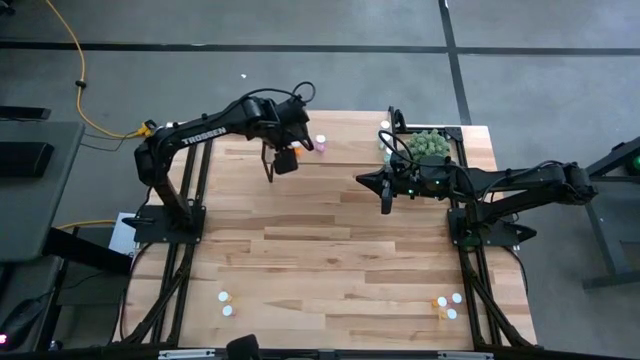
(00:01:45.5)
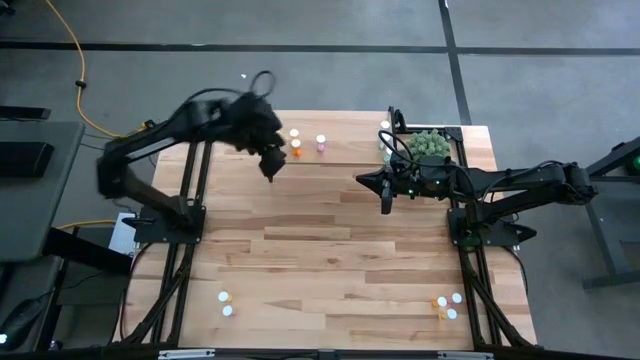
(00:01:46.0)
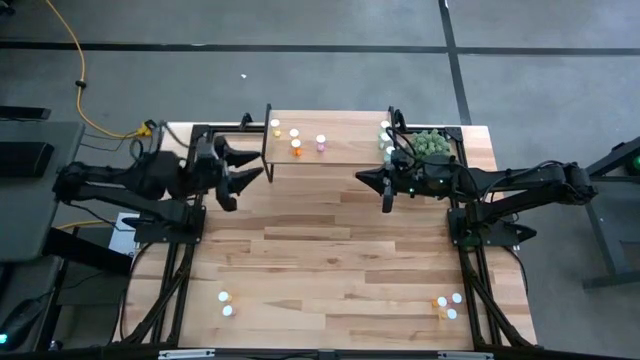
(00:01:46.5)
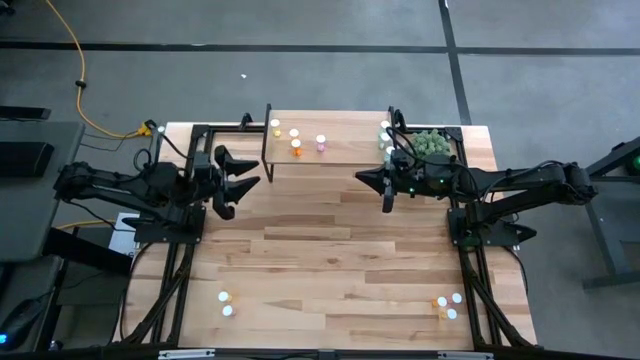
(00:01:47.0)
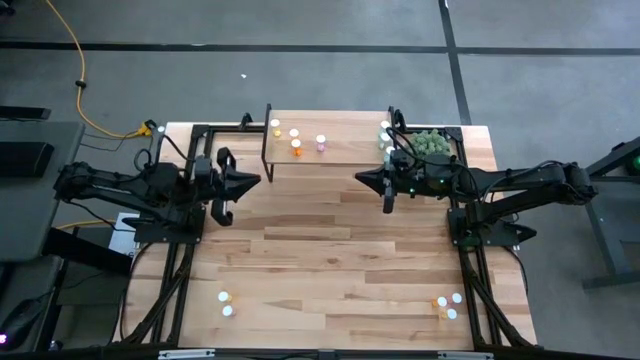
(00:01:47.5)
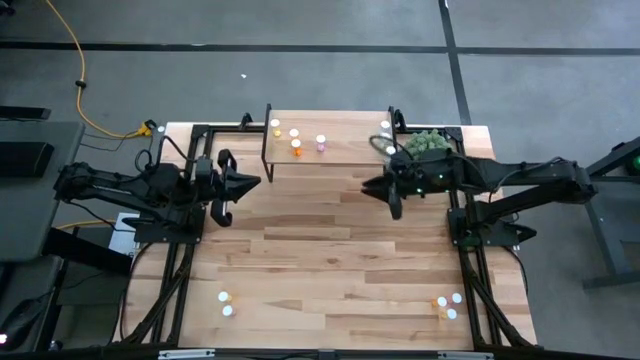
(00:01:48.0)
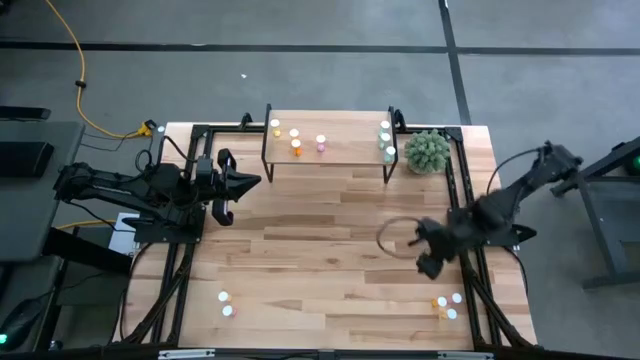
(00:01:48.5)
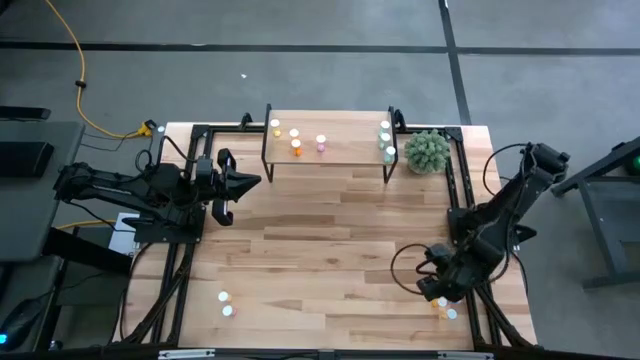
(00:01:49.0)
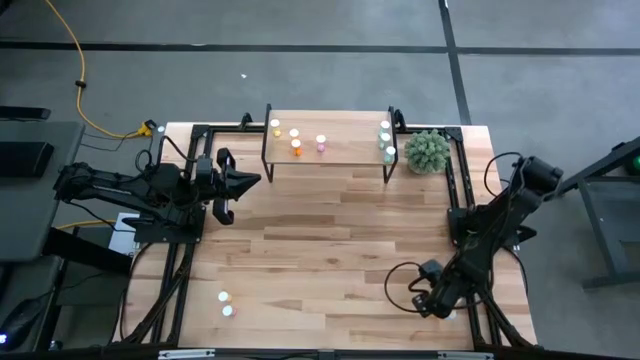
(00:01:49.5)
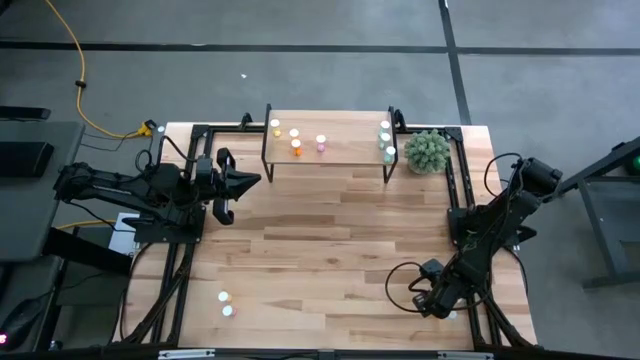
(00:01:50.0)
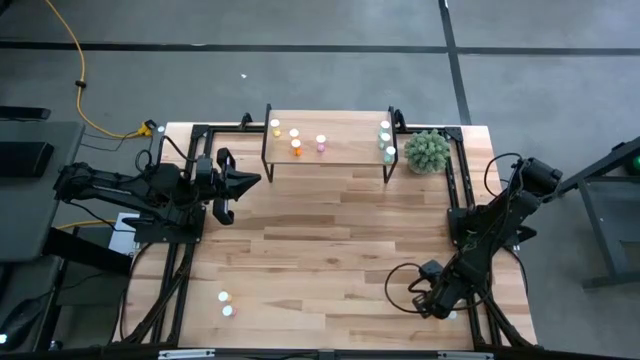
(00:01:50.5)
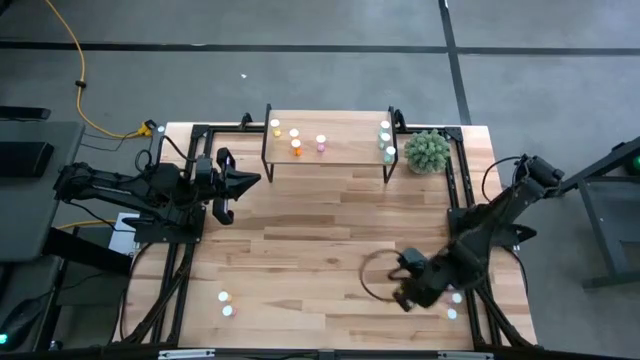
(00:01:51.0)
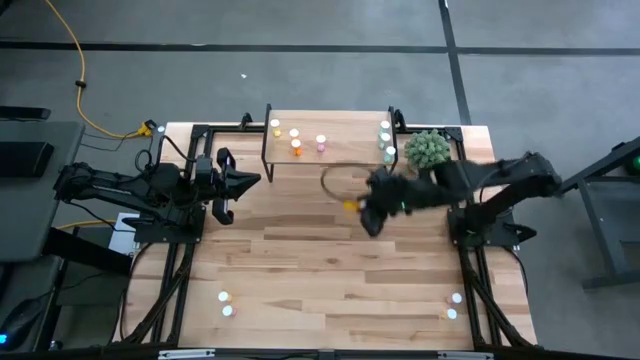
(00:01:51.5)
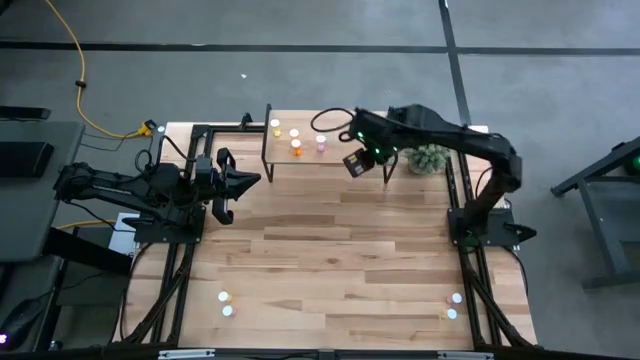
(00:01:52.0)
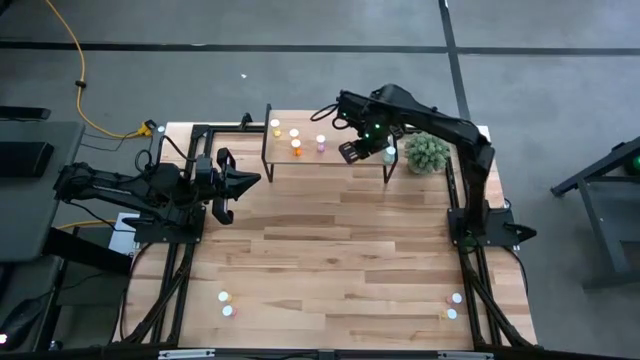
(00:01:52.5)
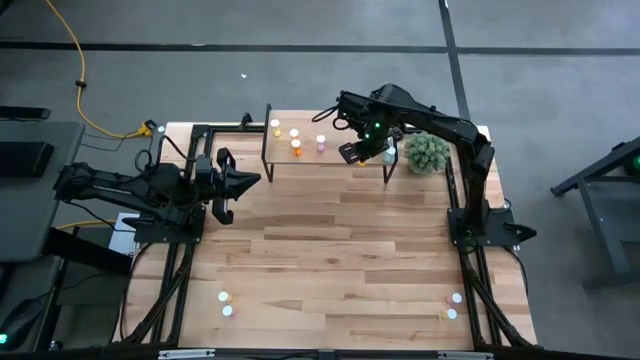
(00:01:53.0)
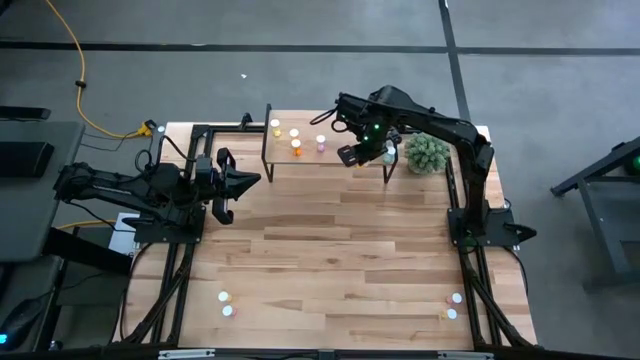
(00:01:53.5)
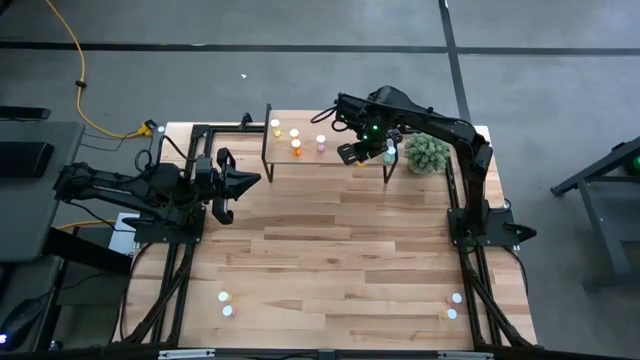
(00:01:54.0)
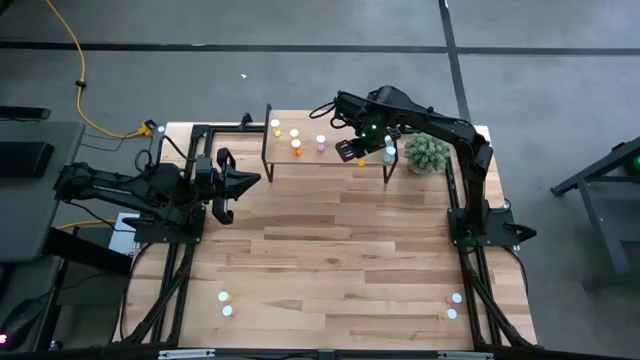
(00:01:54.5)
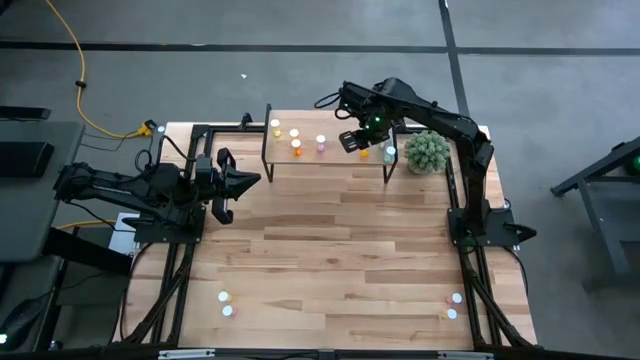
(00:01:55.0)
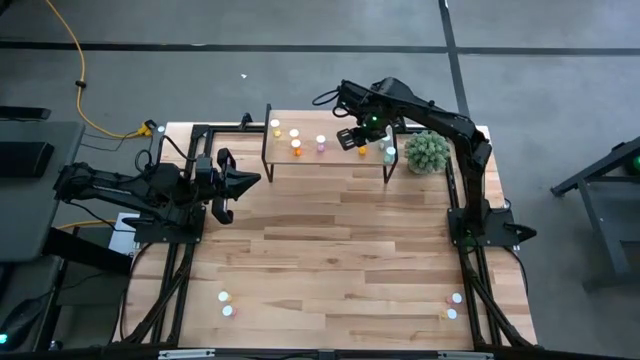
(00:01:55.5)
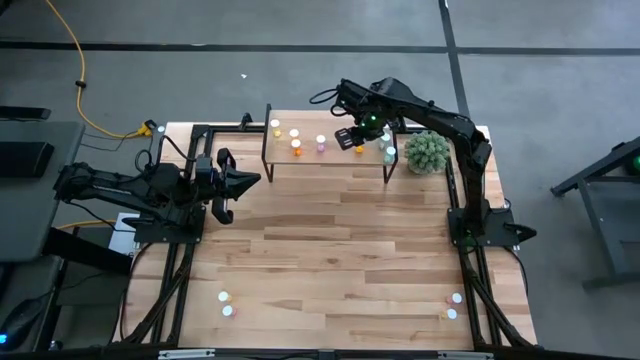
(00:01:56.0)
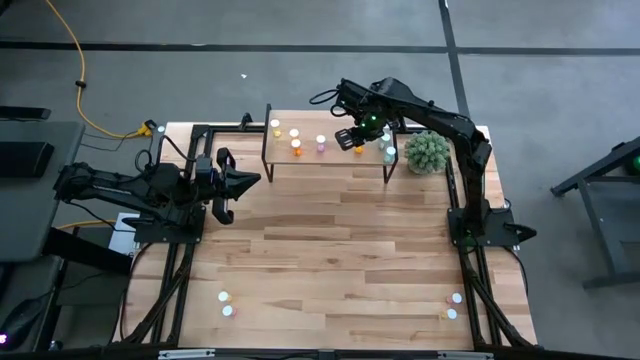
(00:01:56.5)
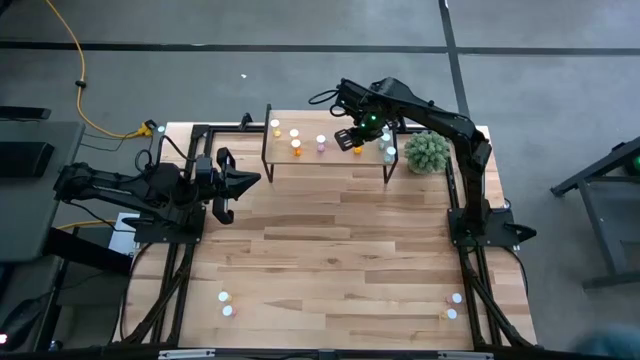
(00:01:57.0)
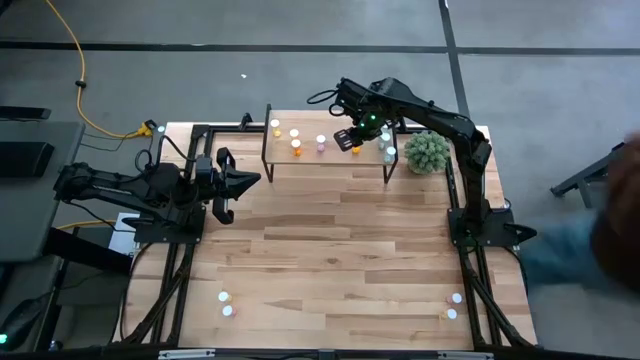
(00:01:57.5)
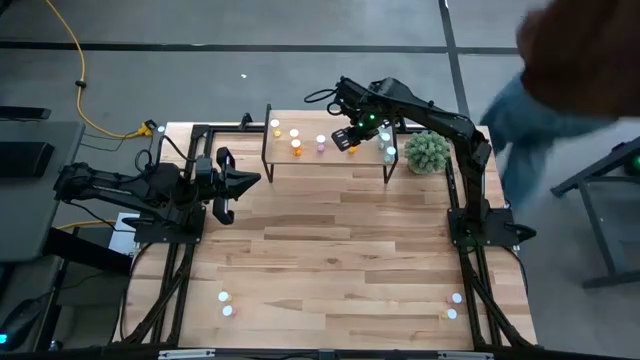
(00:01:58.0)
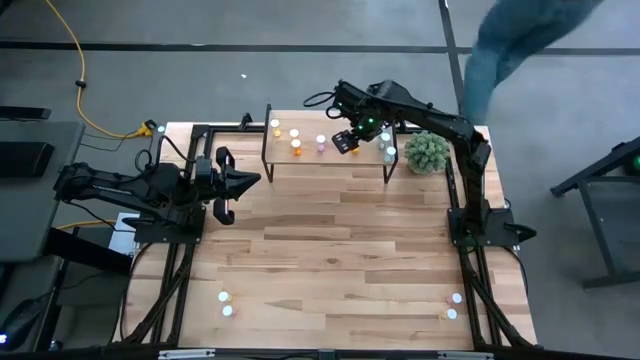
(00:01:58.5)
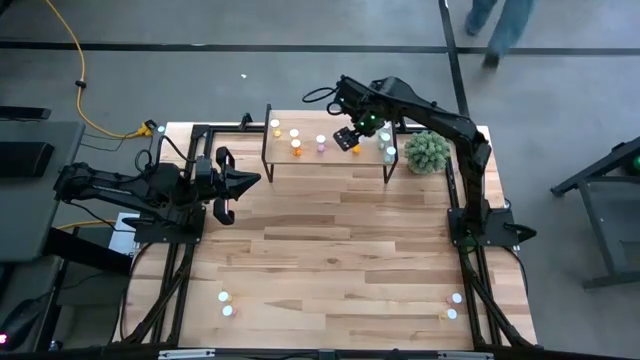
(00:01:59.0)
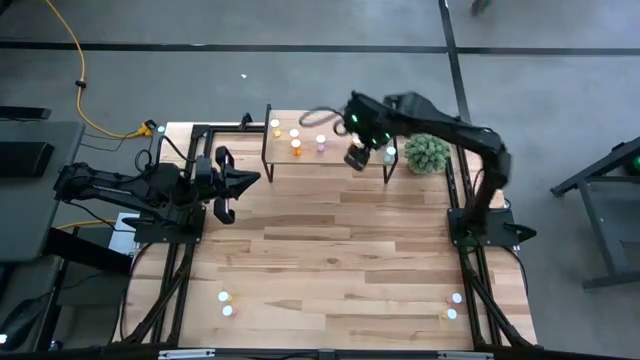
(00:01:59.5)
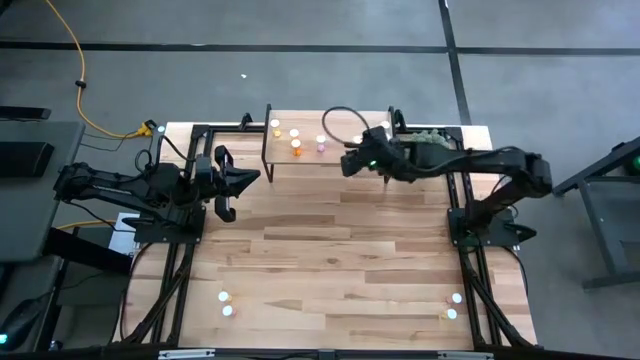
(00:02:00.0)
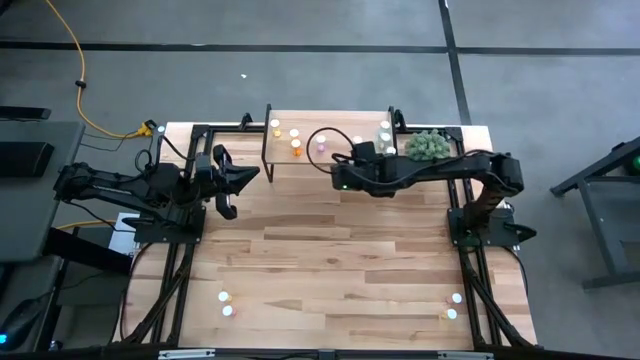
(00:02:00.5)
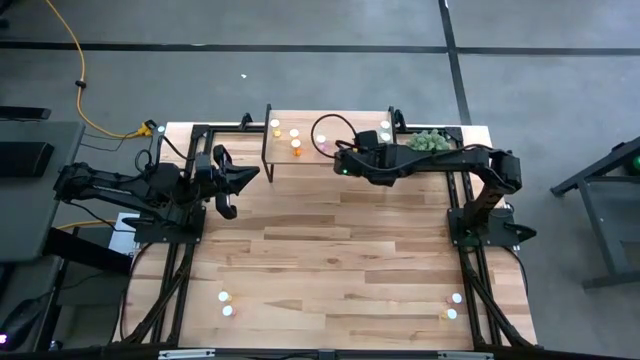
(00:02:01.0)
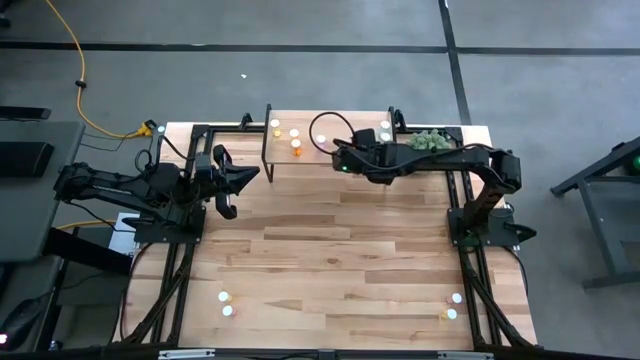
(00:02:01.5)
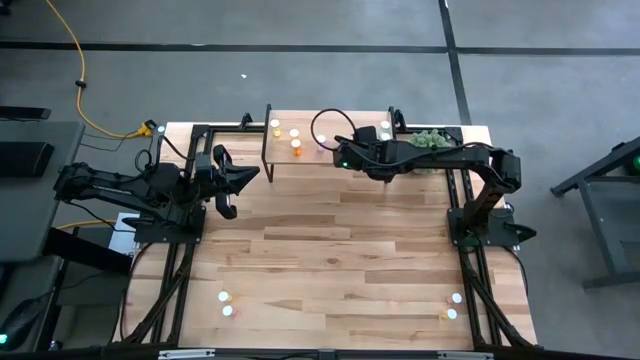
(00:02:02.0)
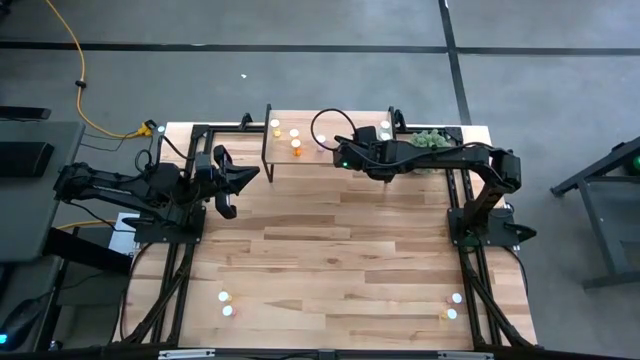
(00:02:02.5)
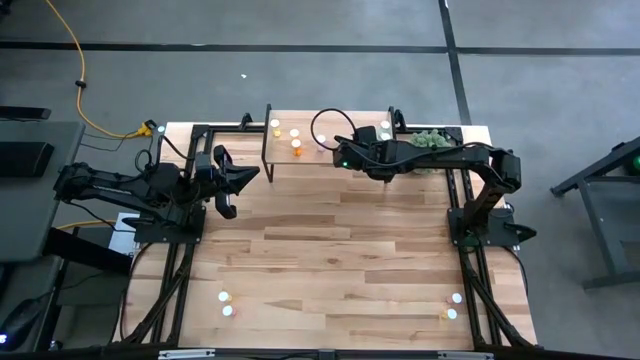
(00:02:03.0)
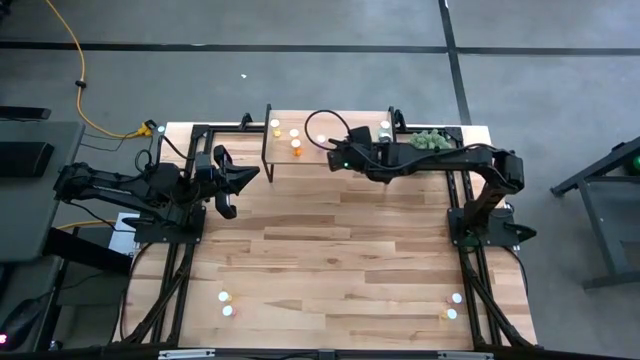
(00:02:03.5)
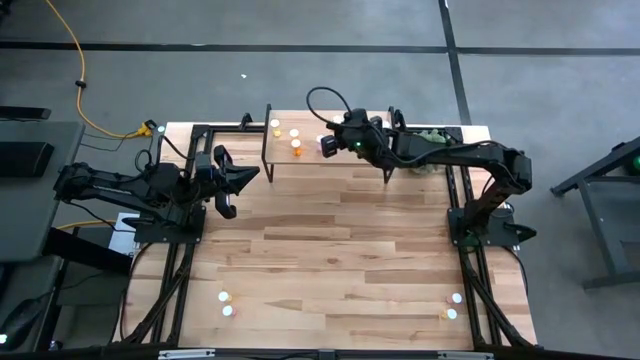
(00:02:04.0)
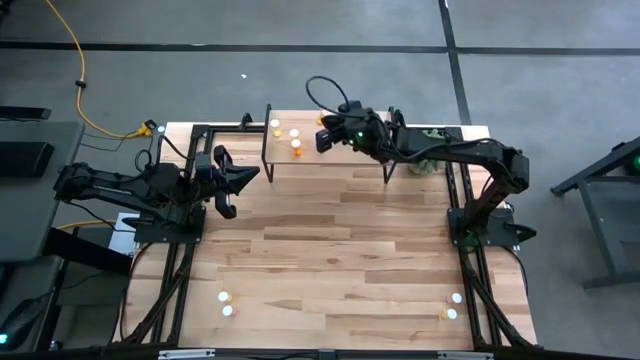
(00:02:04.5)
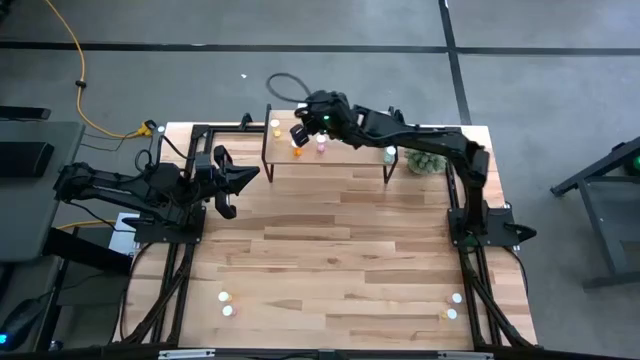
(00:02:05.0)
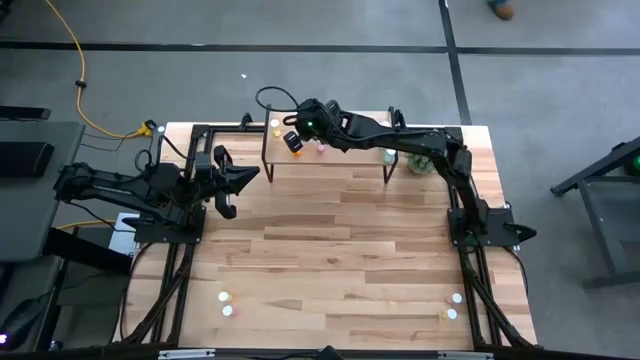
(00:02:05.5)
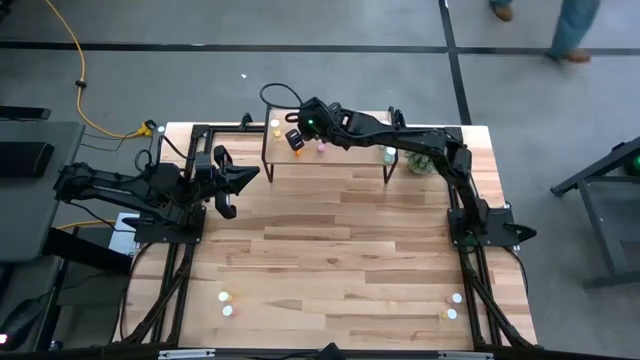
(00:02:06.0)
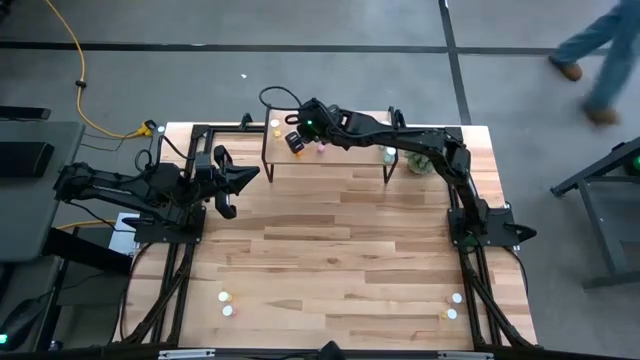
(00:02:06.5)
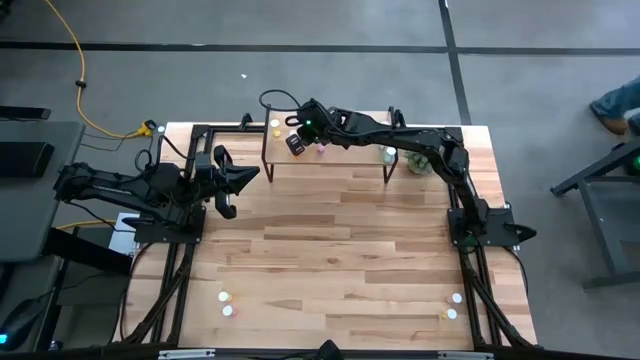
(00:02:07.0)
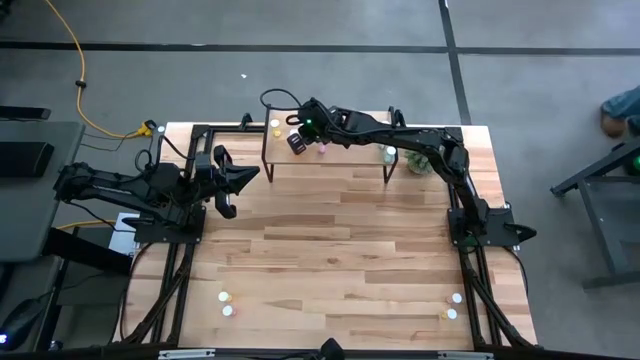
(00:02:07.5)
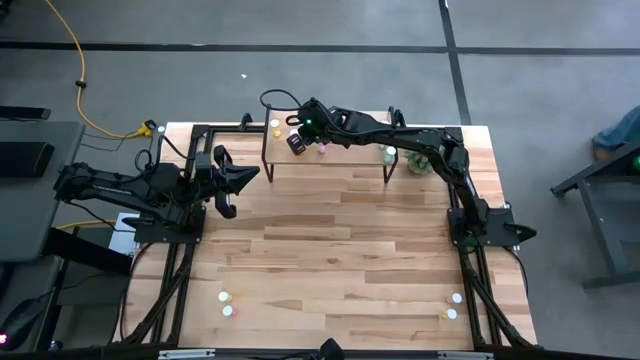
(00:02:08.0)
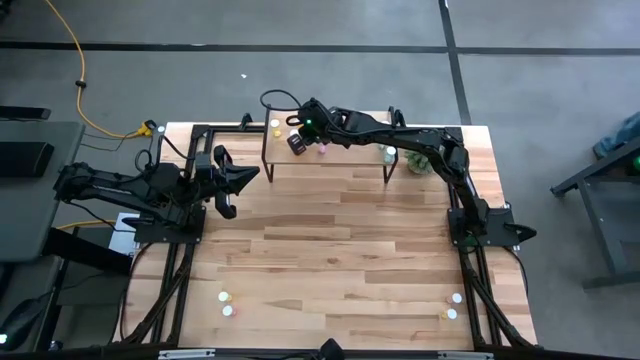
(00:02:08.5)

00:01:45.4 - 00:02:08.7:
Task: Pick and place medicine bottles onto shelf by color
Put the orange pill bottle aligned with the other orange pill bottles on the shelf
